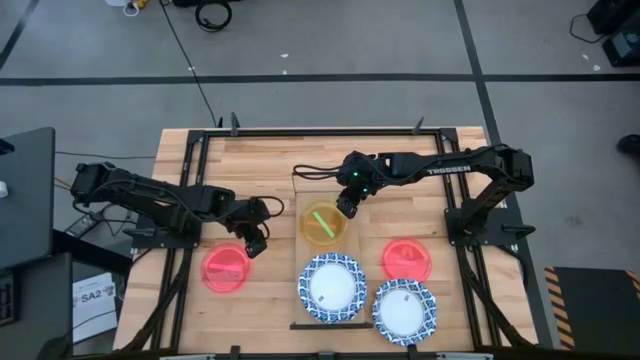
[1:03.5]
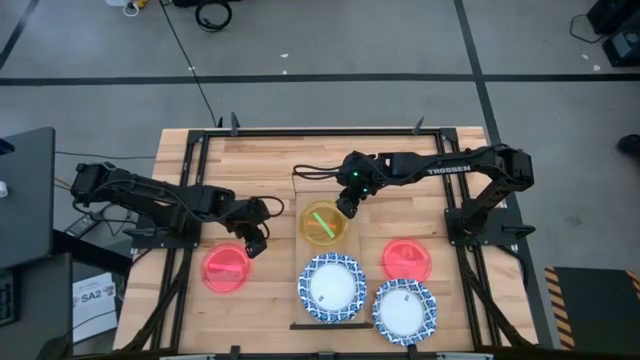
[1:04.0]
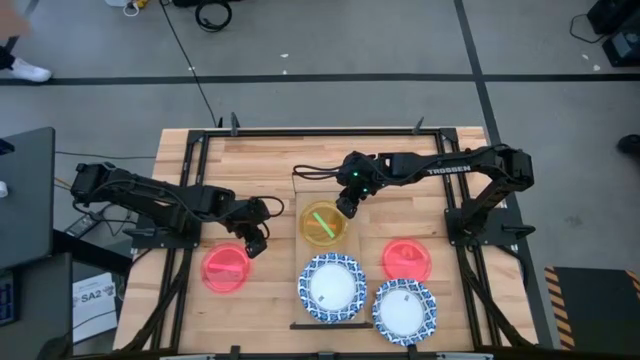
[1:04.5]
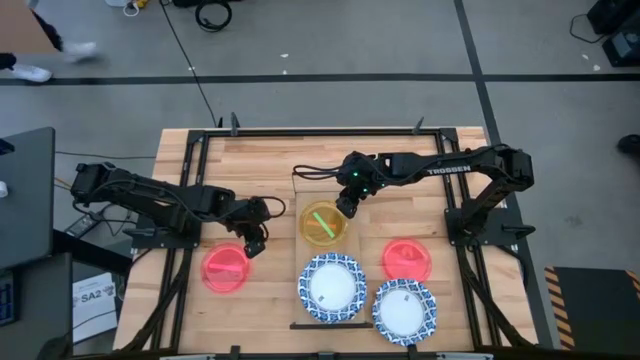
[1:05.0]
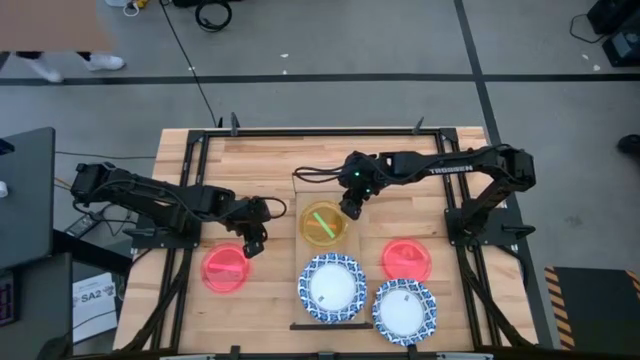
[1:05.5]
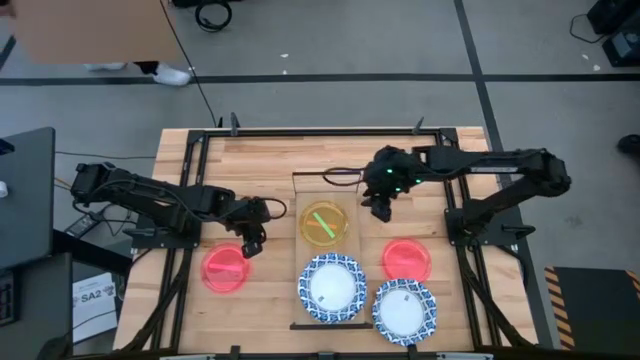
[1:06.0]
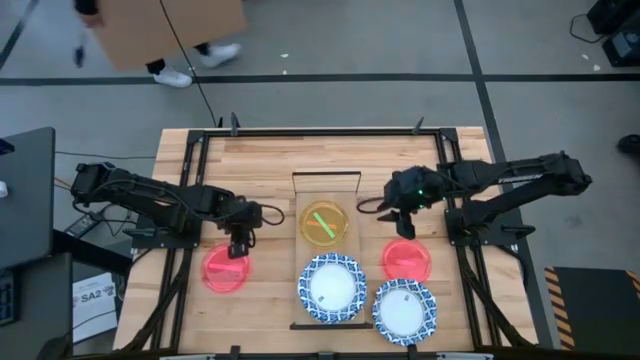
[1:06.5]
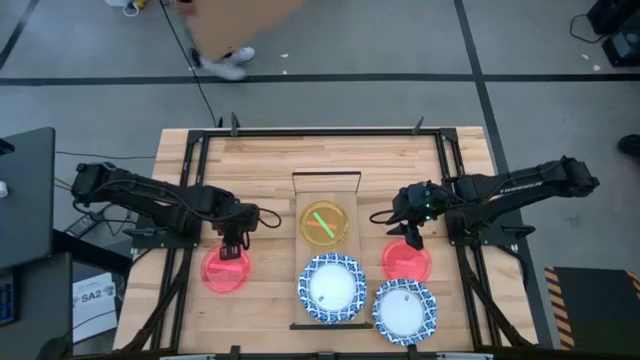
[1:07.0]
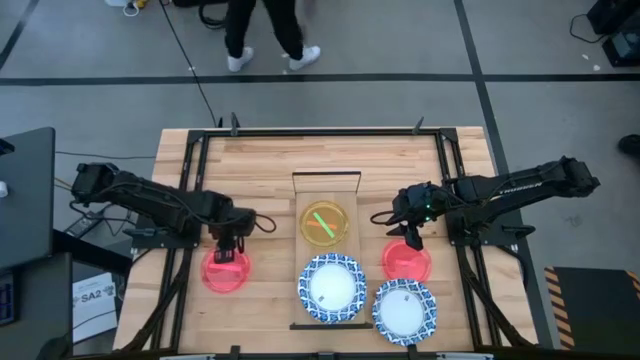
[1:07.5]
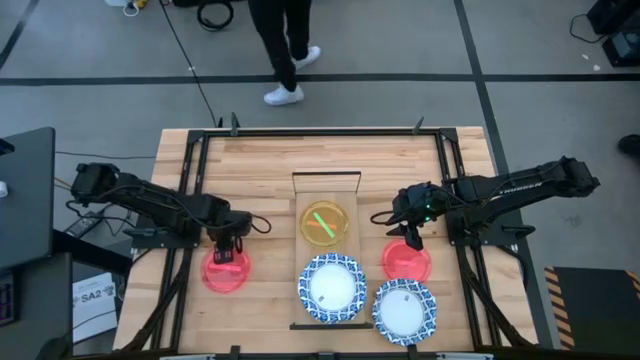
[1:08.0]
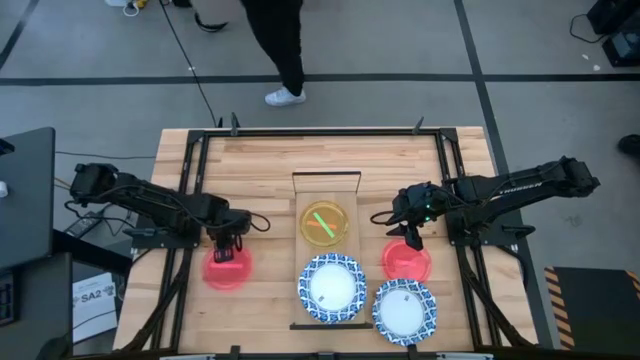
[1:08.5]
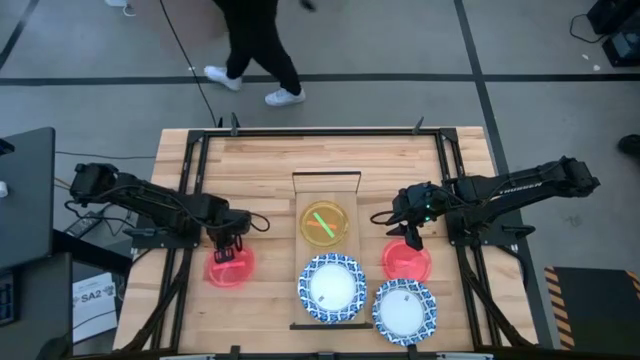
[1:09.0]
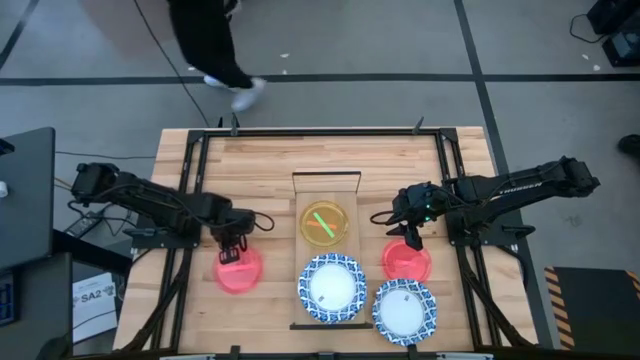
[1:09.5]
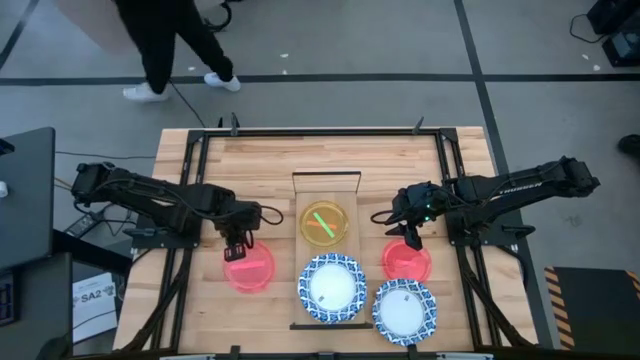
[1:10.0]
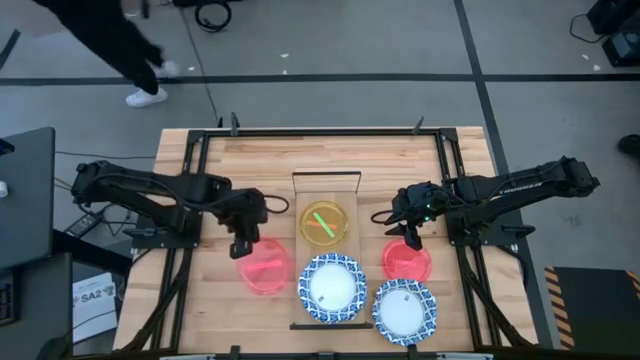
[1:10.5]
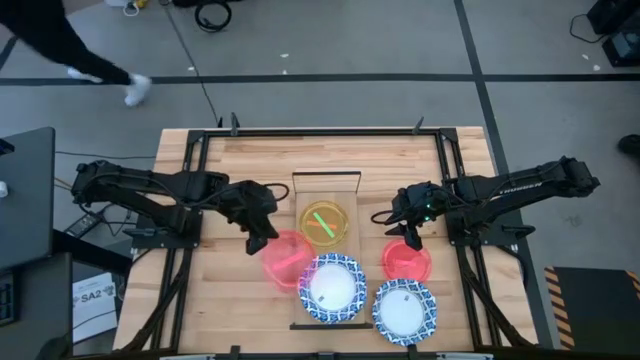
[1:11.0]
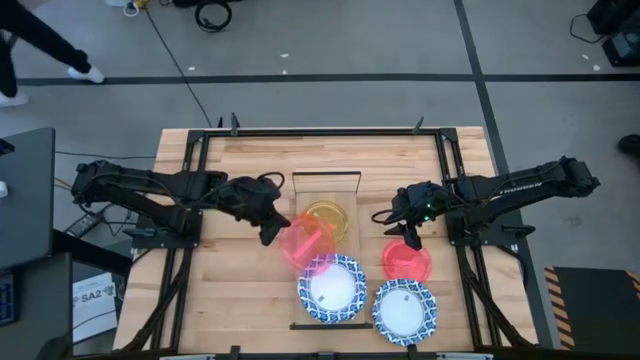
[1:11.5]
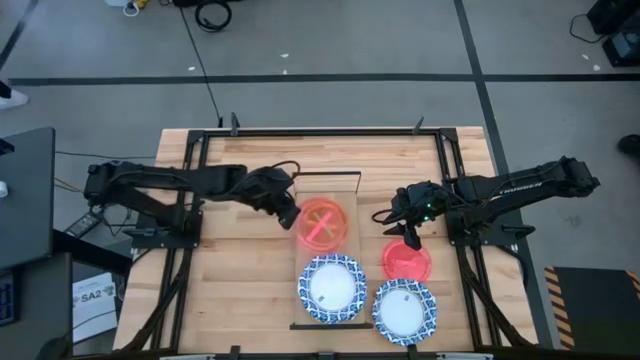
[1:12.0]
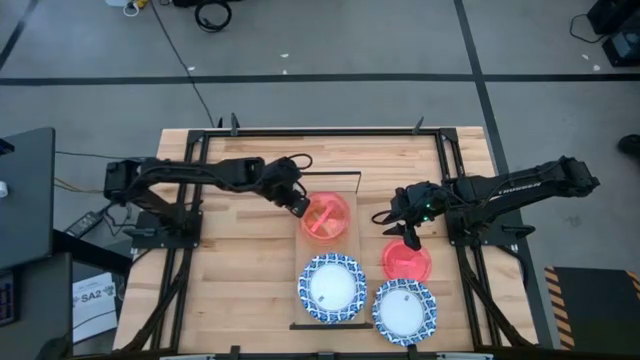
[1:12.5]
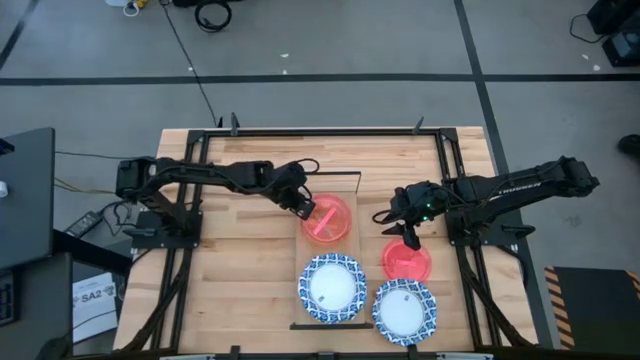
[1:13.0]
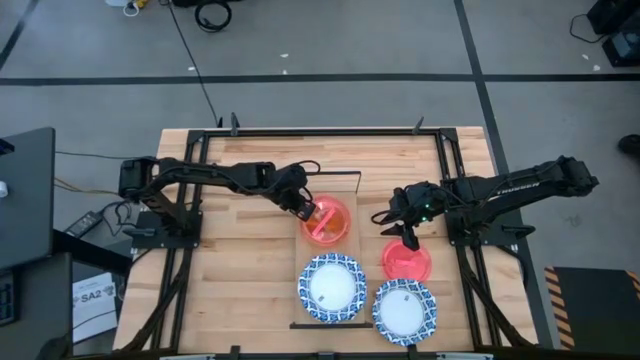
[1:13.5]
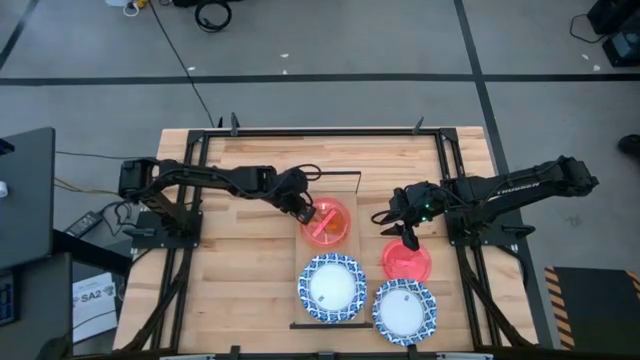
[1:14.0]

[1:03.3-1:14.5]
Task: Place and stack plates onto a shelf
Stack the left pink transparent plate on the green transparent plate on the shelf

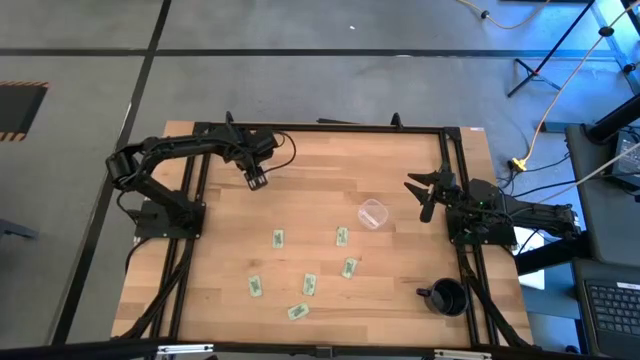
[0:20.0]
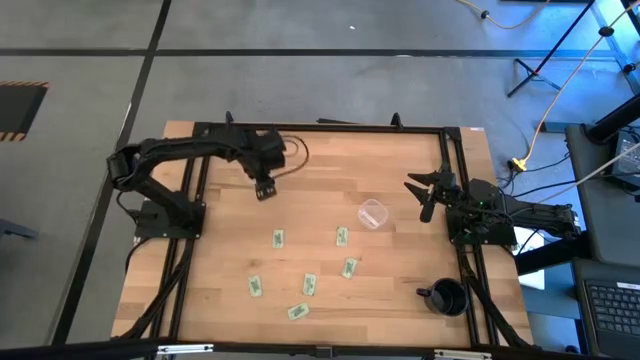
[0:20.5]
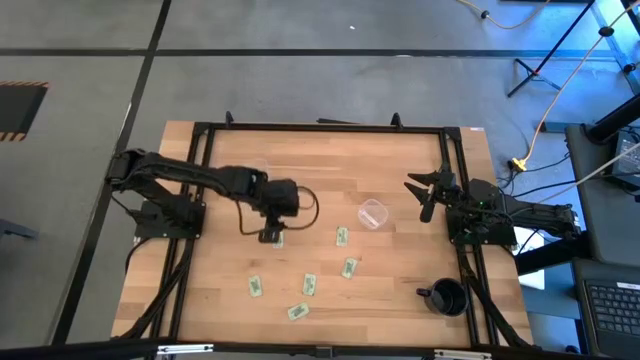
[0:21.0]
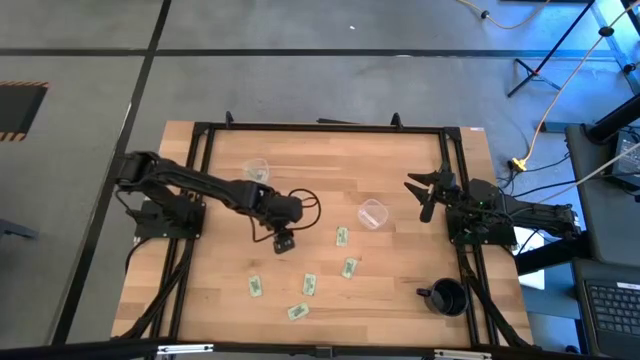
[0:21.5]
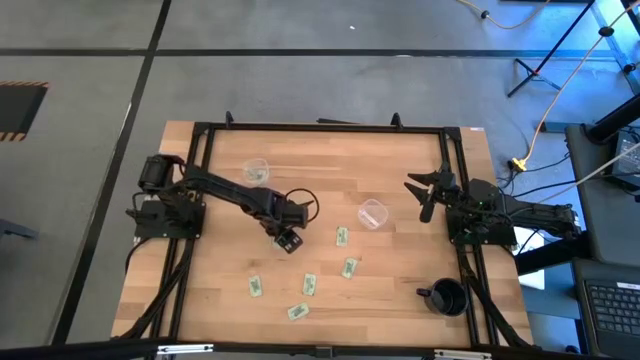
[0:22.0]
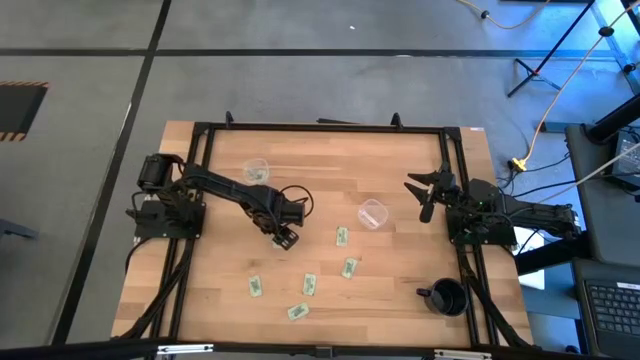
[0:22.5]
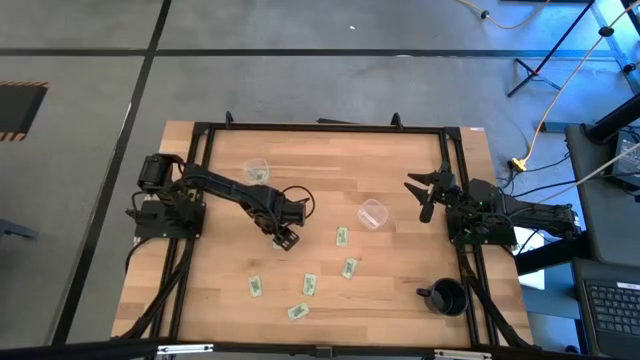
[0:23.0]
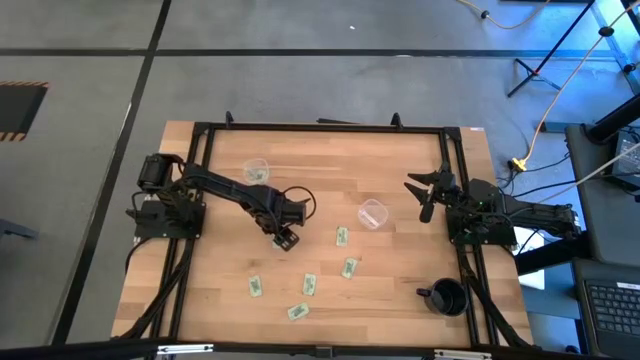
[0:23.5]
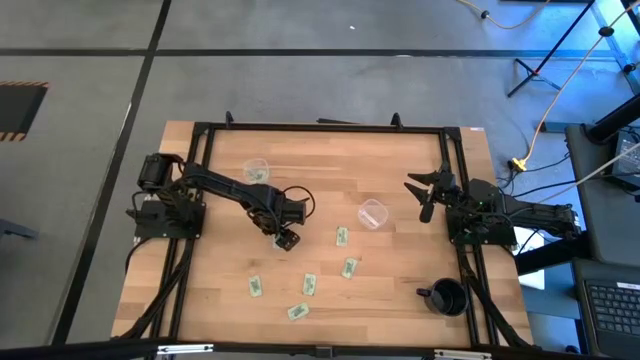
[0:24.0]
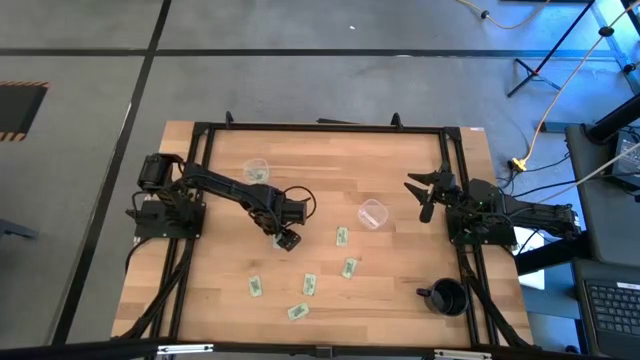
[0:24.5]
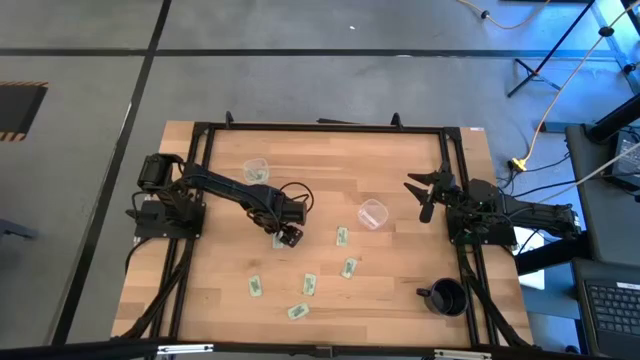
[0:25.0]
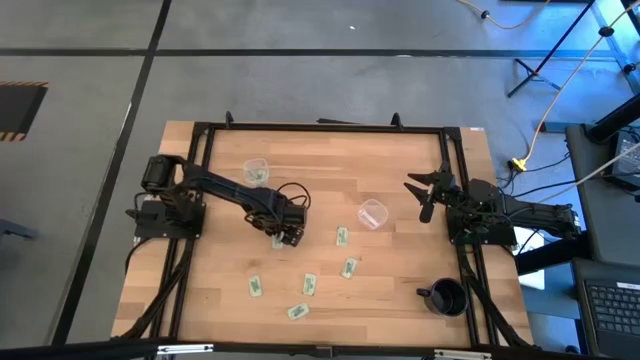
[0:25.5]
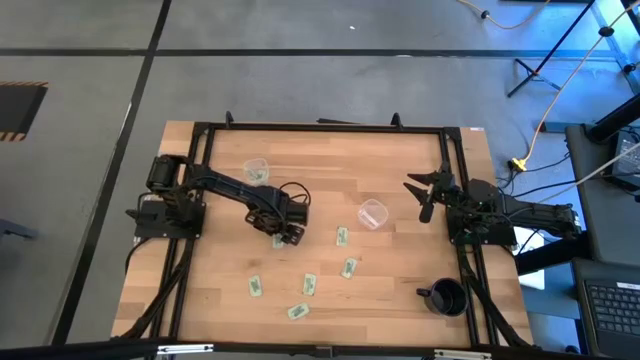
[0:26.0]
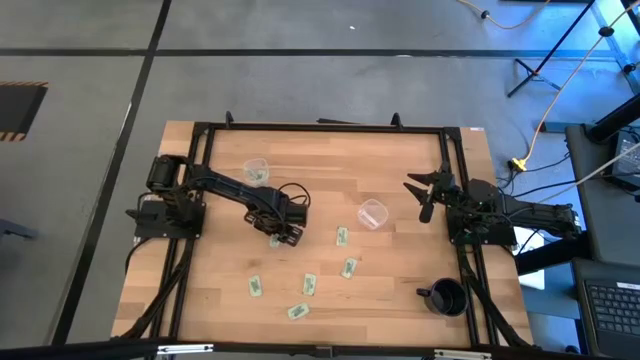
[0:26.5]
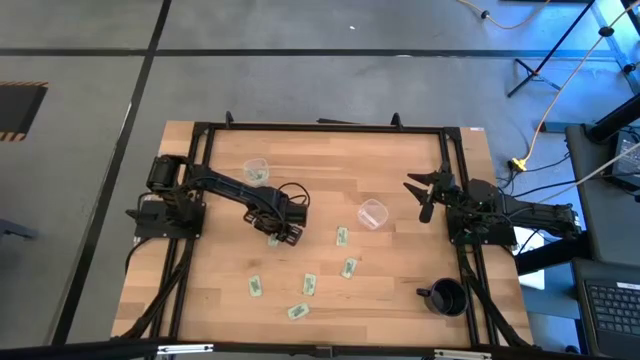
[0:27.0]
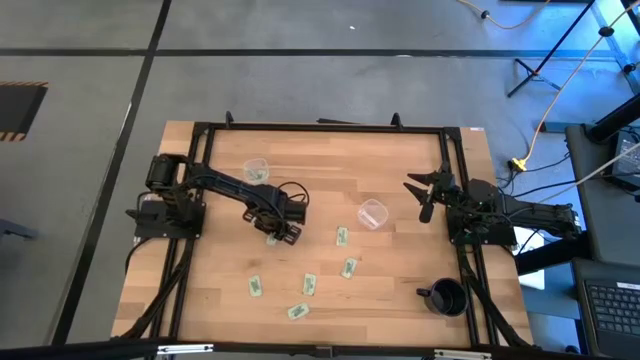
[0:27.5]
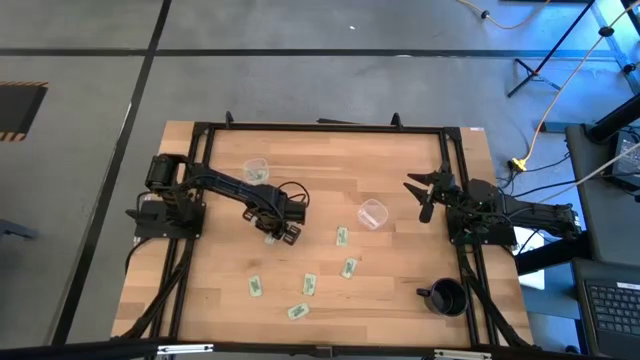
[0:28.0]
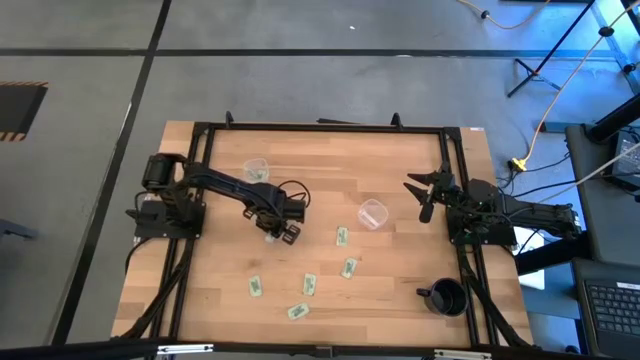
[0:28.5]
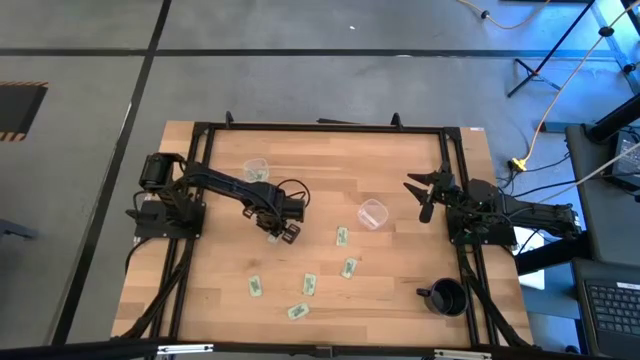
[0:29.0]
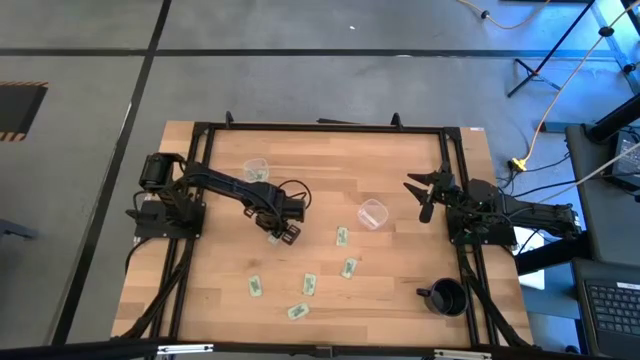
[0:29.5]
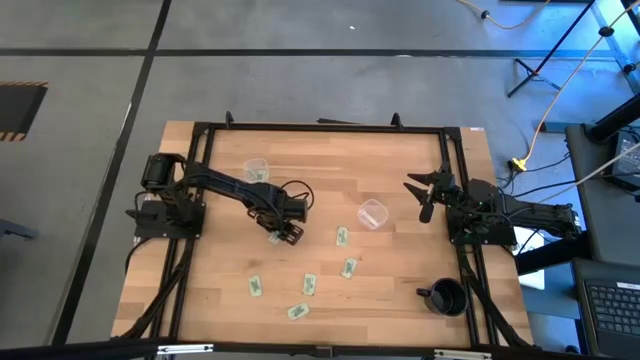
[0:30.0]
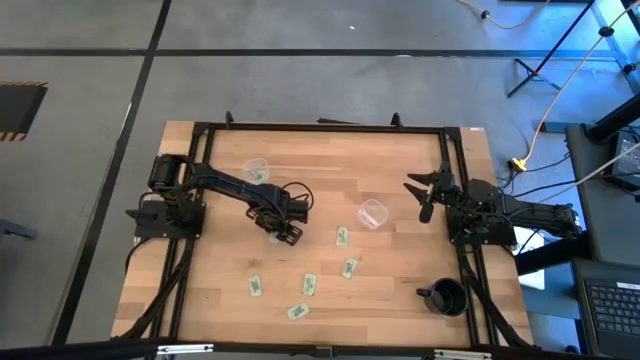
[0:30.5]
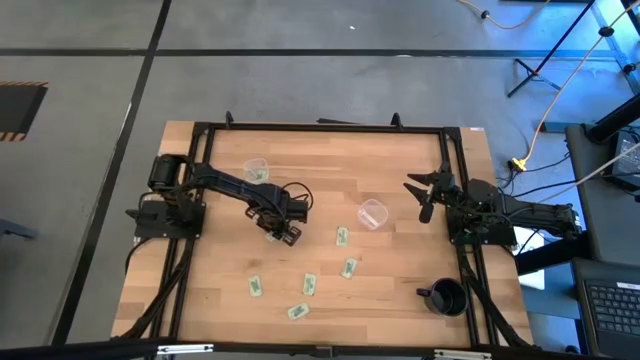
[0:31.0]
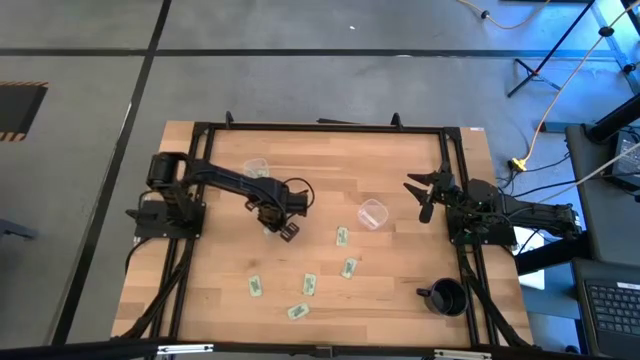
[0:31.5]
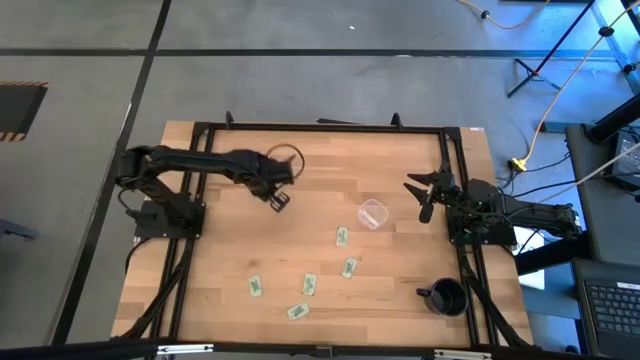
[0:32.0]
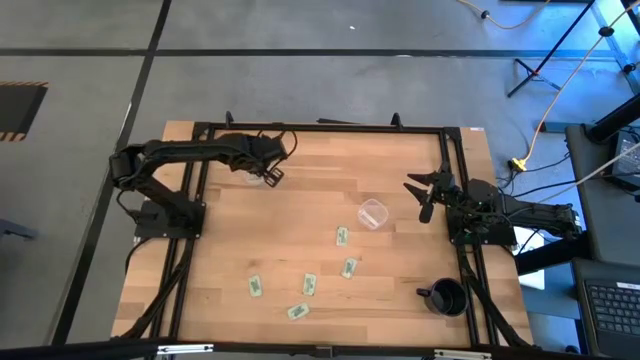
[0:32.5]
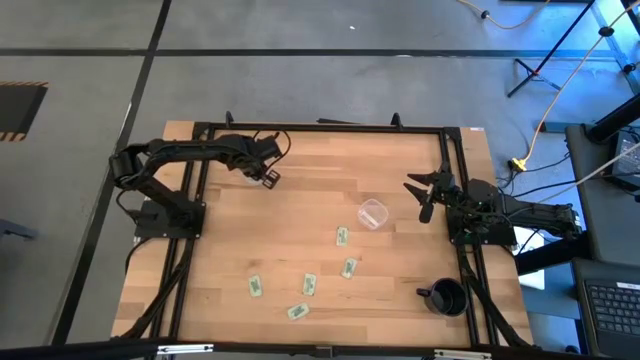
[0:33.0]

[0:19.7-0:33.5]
Task: Pick and place Stevia / Truvia into bins
Put the green stevia packet into the left white container
